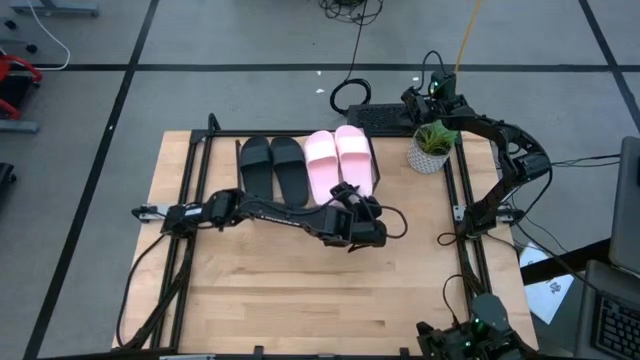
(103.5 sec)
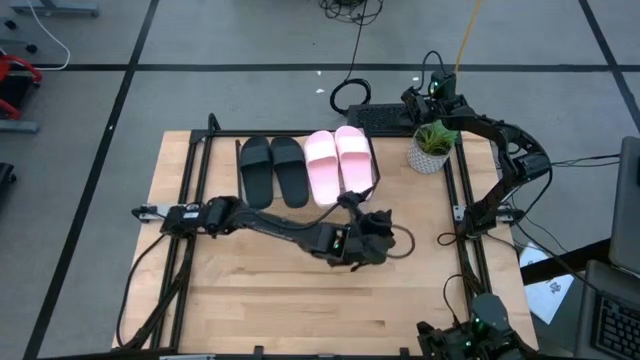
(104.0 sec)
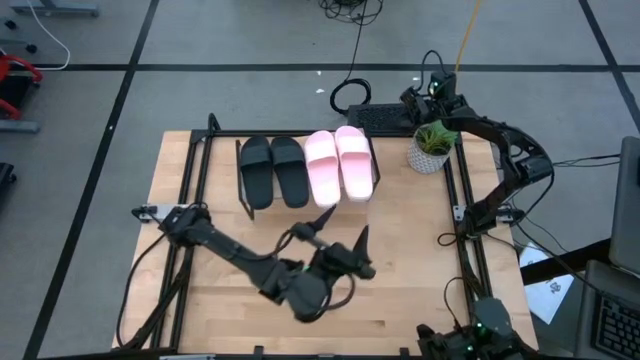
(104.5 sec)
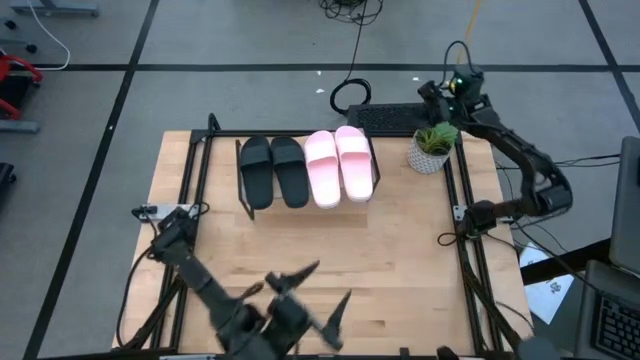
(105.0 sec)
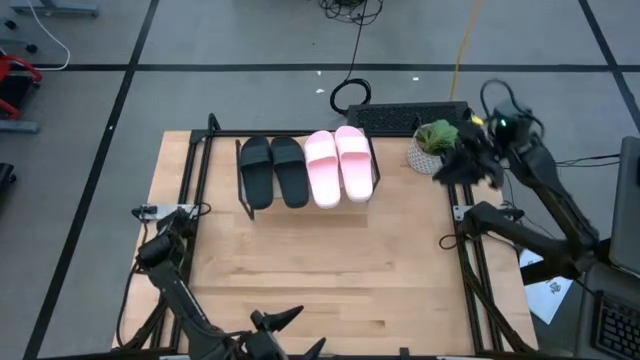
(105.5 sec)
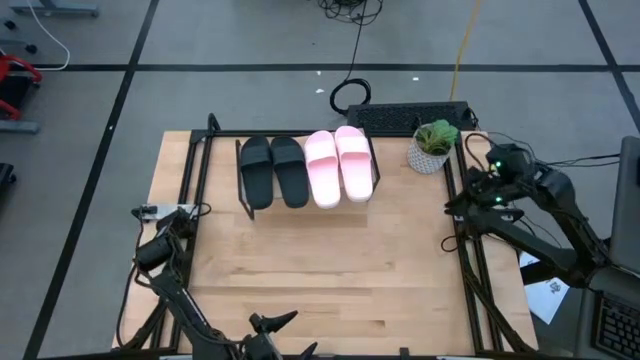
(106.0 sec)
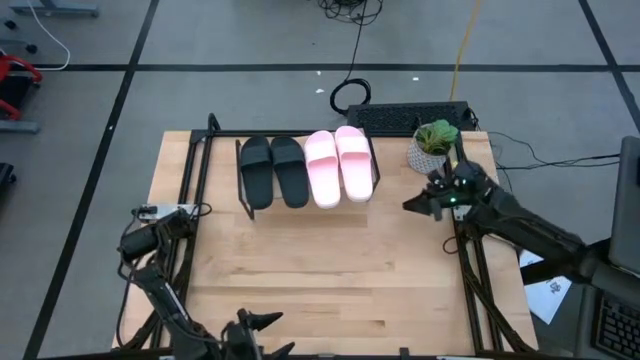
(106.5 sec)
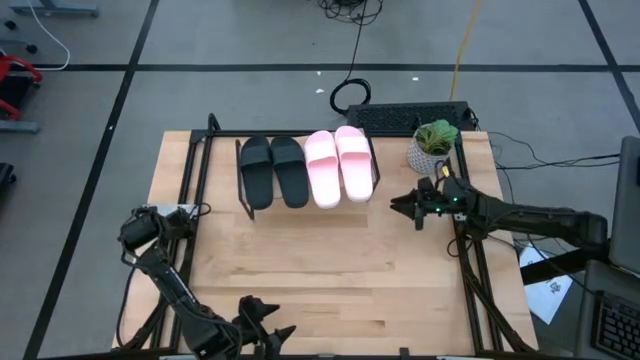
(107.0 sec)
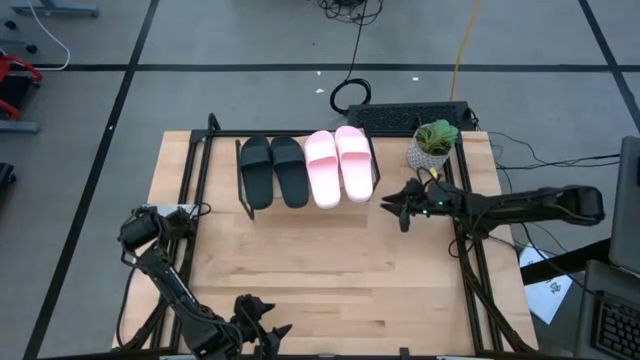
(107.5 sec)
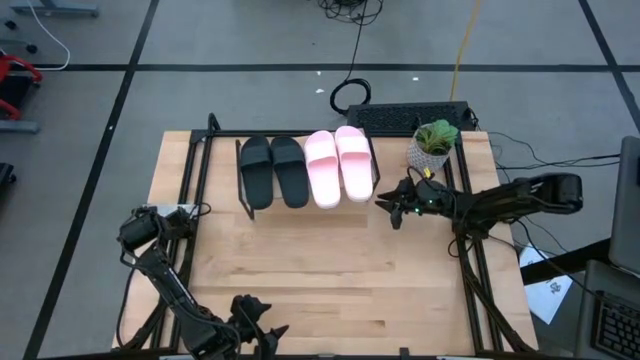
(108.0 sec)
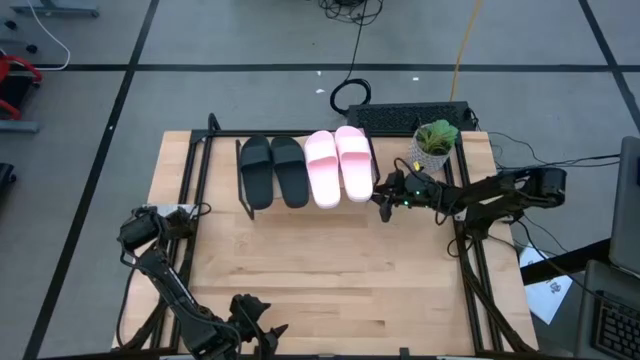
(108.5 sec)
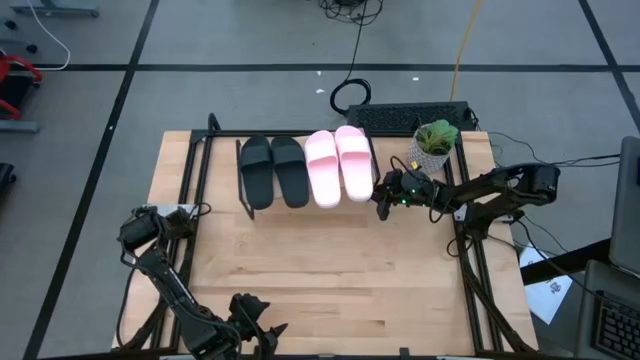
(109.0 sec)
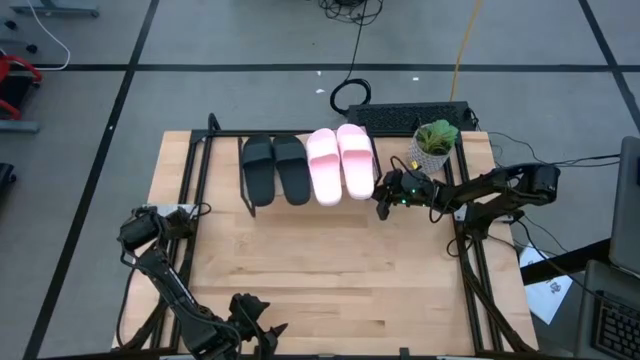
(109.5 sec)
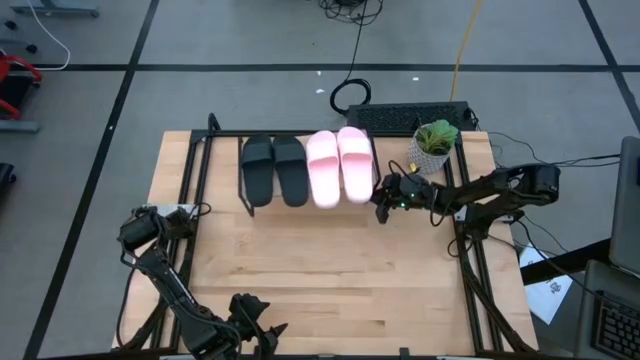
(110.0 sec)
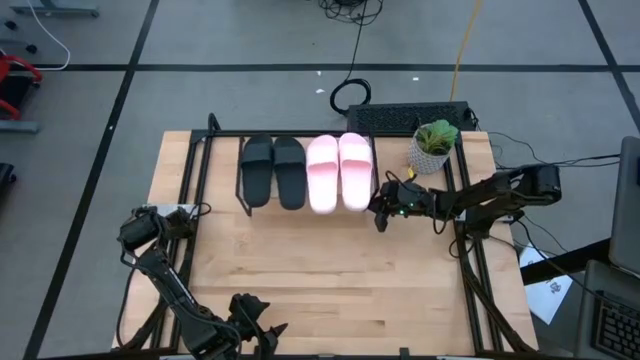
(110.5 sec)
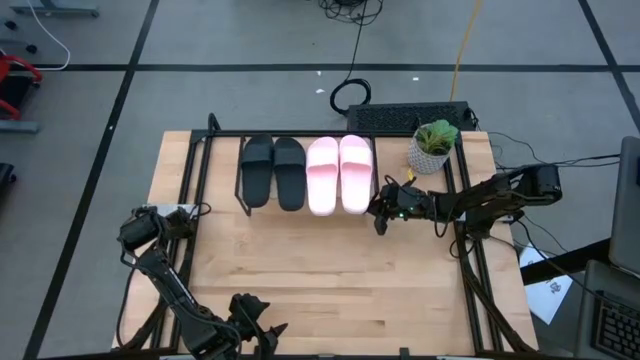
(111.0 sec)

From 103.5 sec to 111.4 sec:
Task: Pick and place slides into the shelf
Adjust the shelf

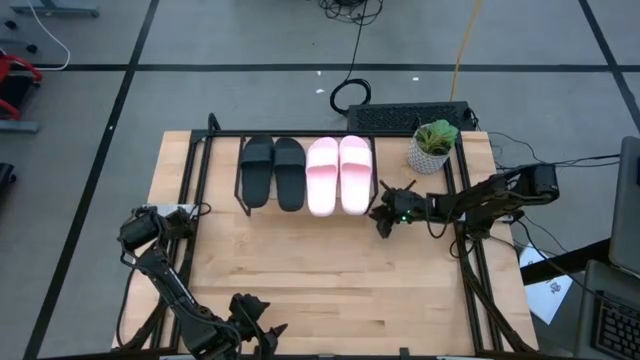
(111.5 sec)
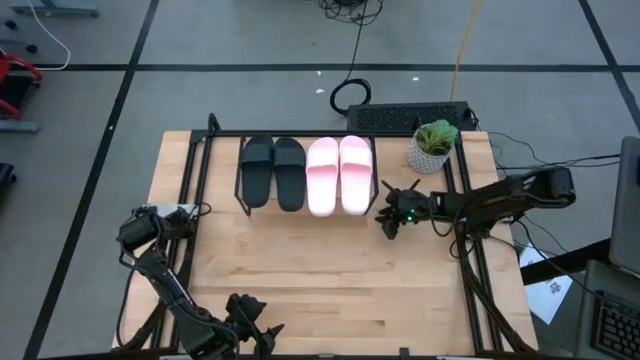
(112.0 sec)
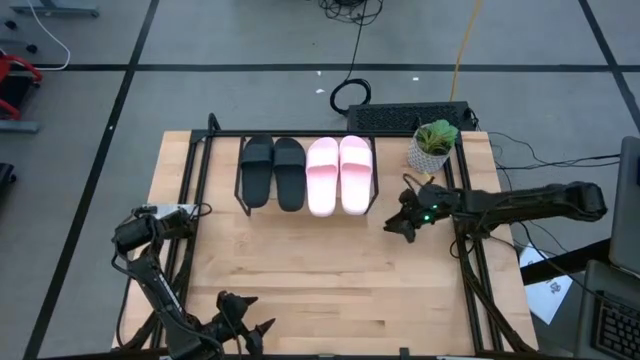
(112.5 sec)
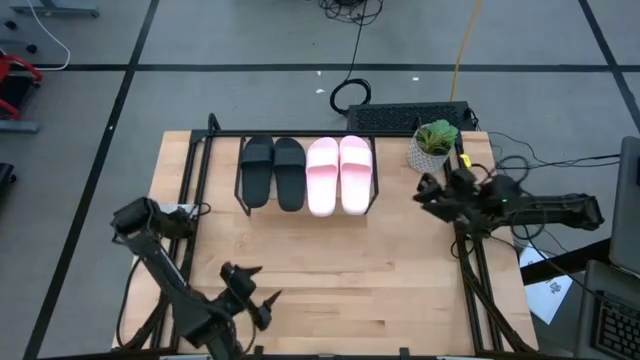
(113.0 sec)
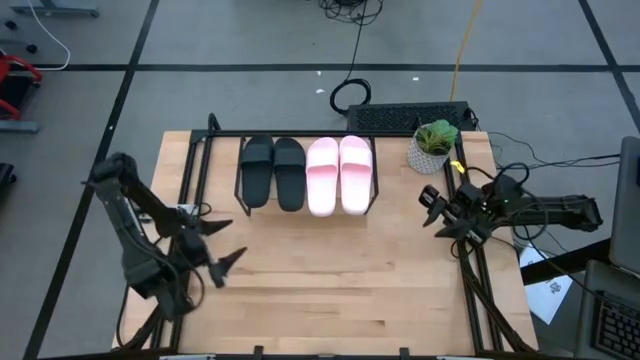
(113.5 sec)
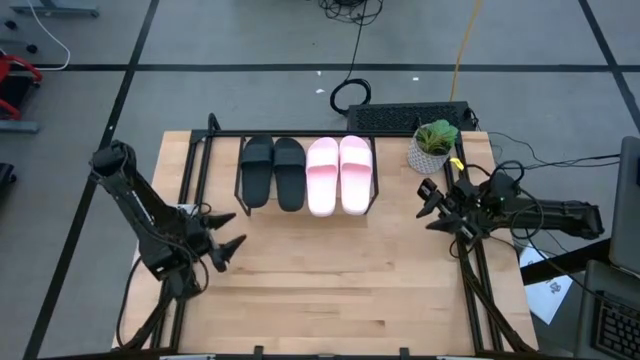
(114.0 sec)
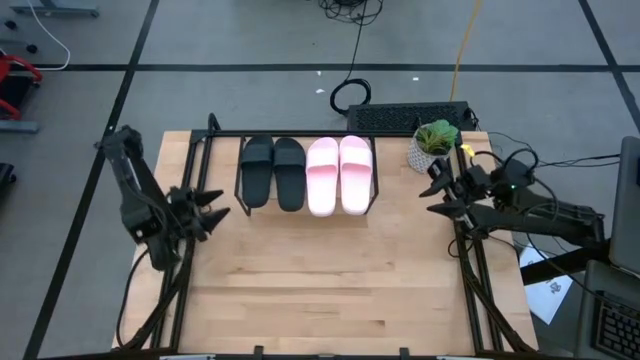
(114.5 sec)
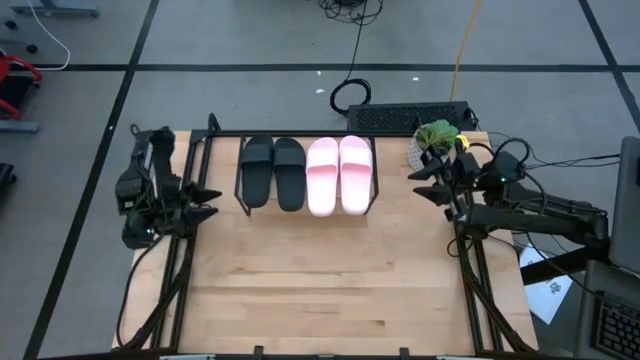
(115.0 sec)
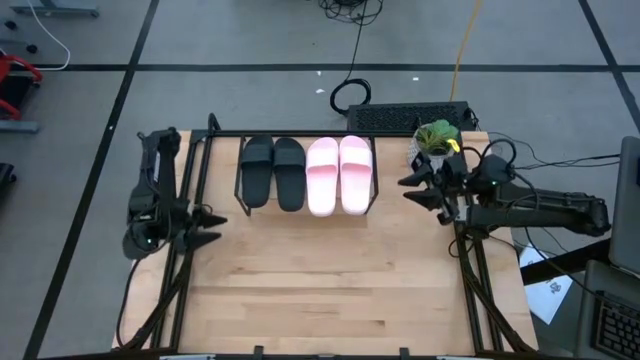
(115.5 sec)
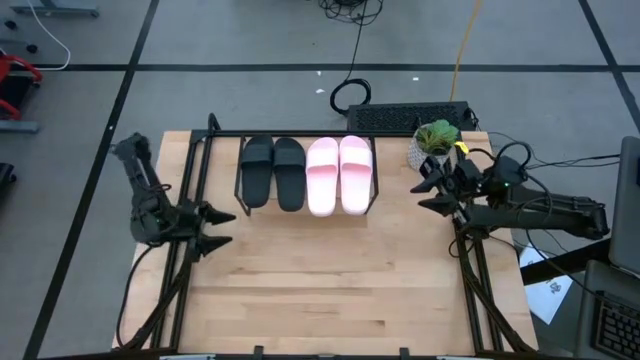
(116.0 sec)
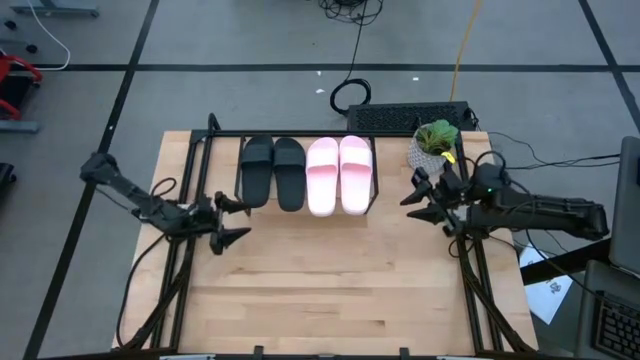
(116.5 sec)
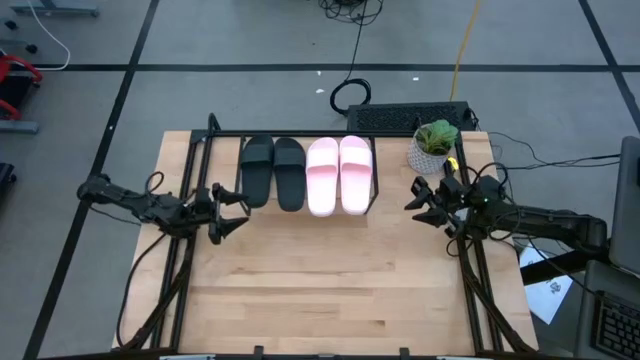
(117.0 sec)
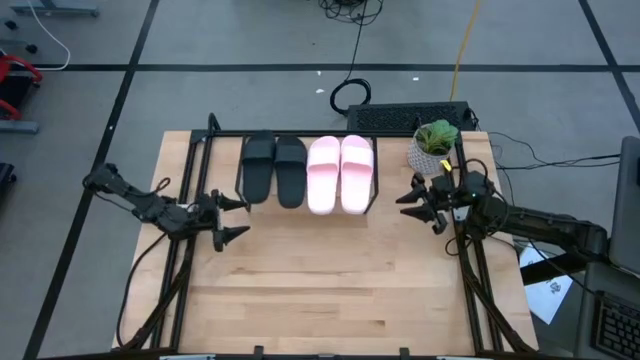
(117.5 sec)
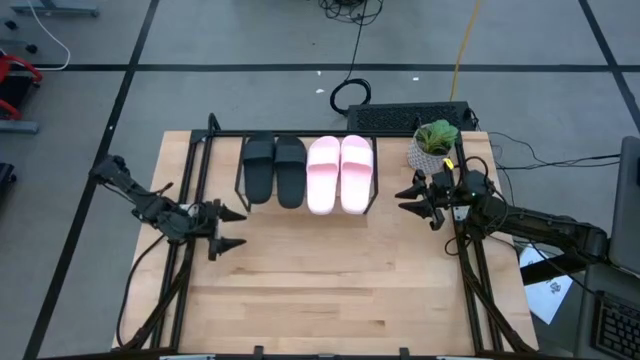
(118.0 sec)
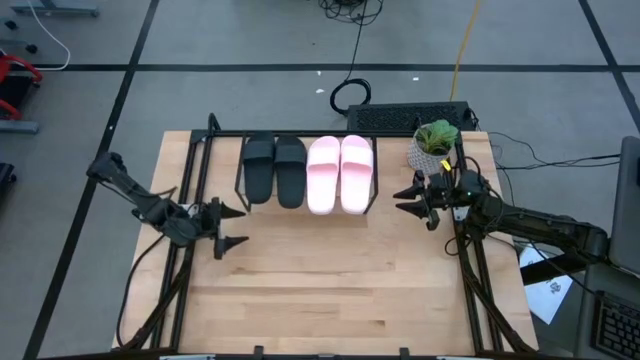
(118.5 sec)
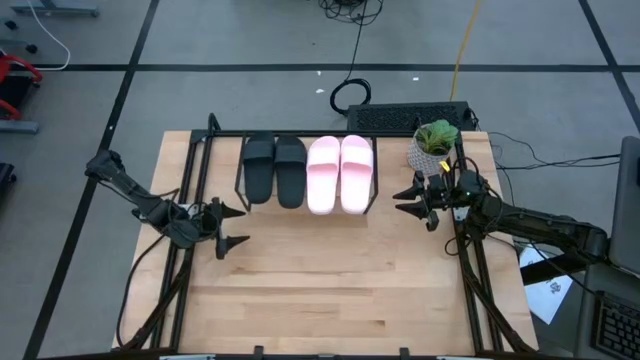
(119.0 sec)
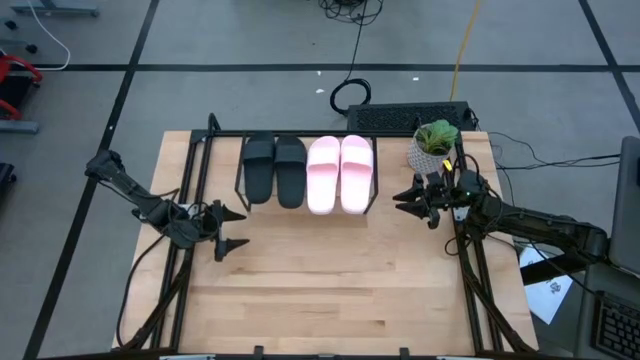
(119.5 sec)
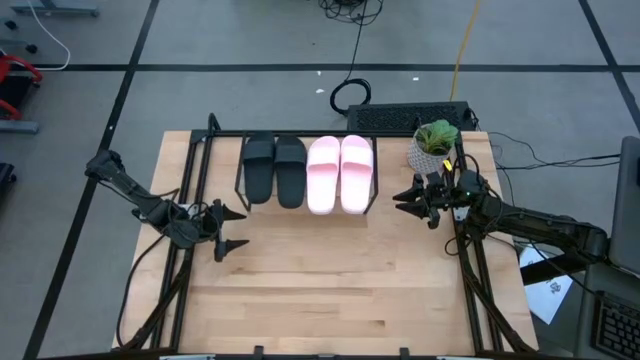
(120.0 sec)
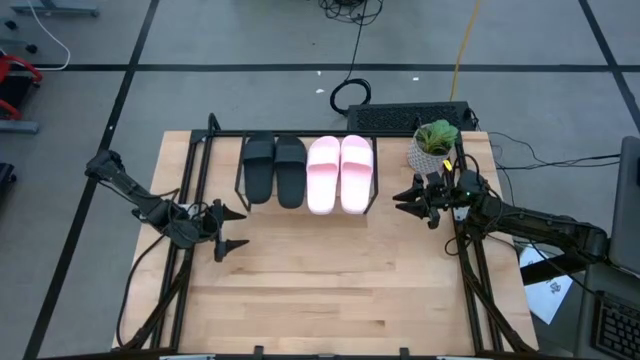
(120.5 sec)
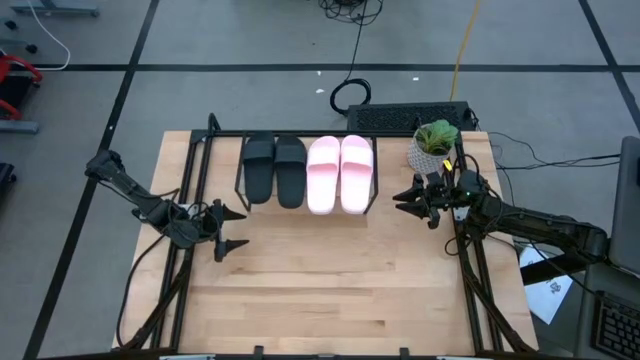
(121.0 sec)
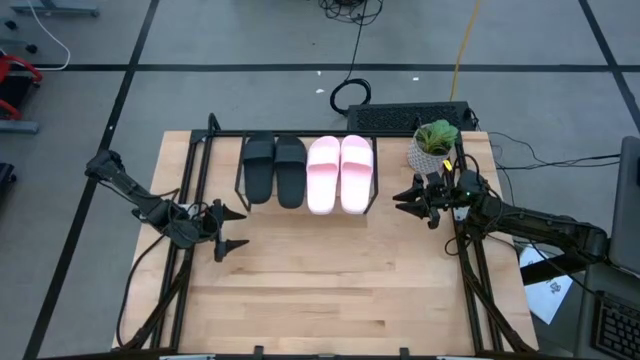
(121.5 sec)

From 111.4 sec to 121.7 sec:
Return to Home Position

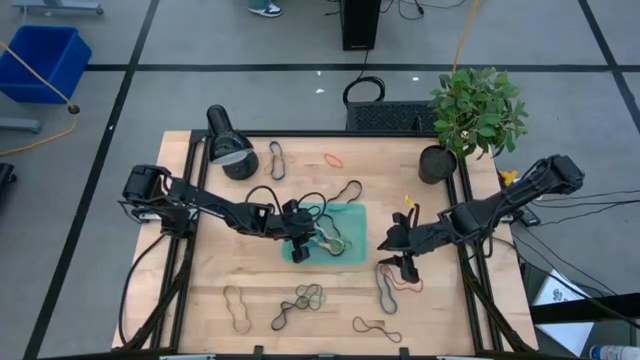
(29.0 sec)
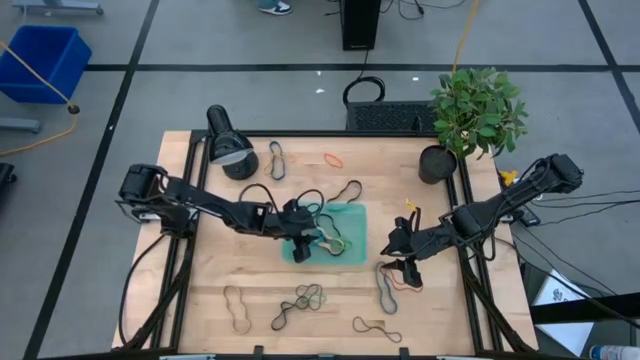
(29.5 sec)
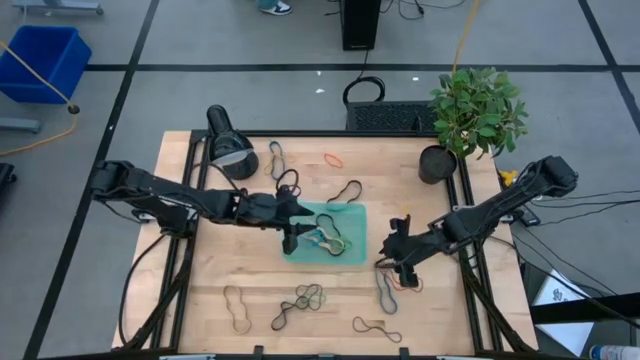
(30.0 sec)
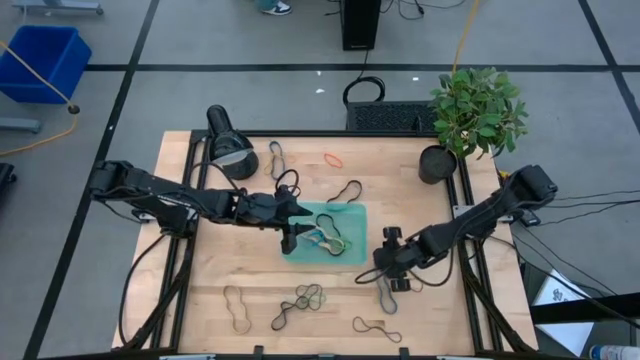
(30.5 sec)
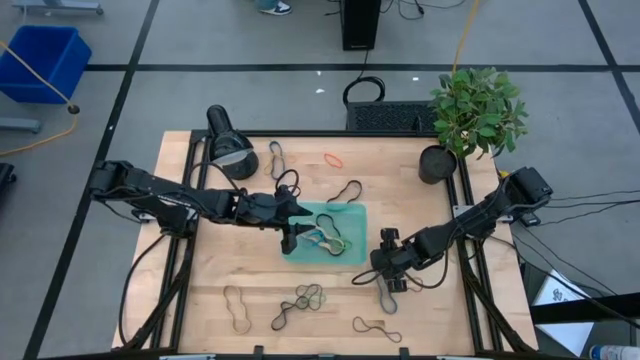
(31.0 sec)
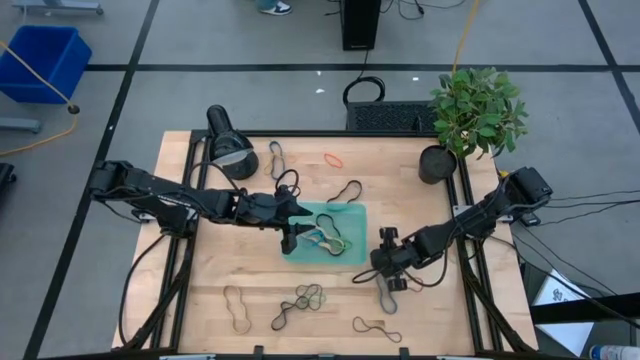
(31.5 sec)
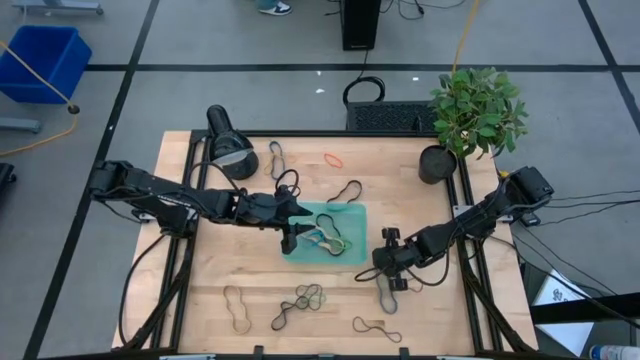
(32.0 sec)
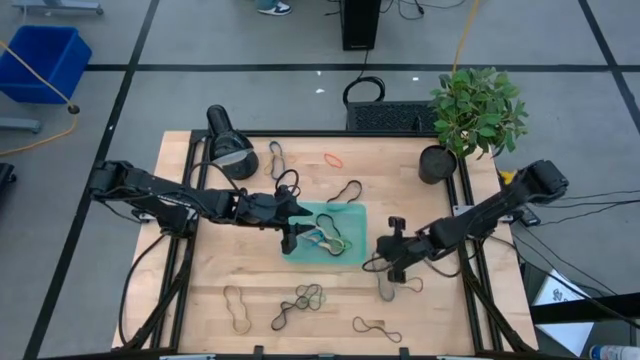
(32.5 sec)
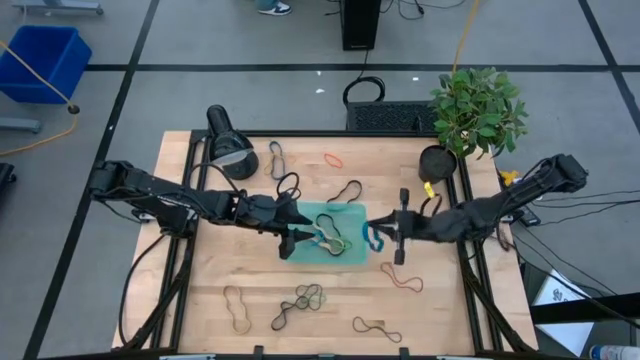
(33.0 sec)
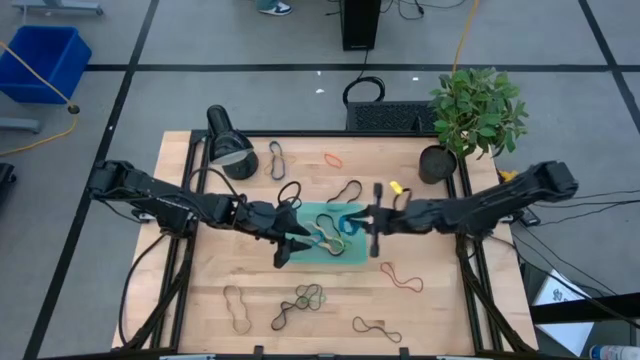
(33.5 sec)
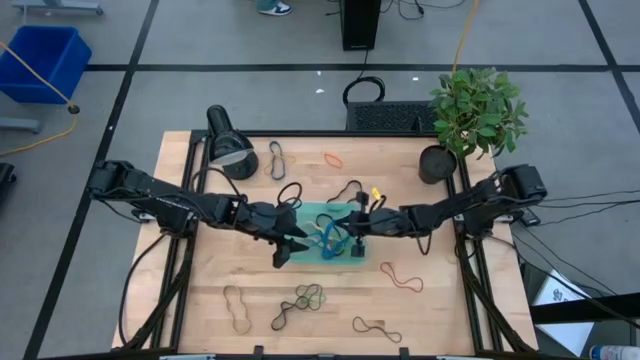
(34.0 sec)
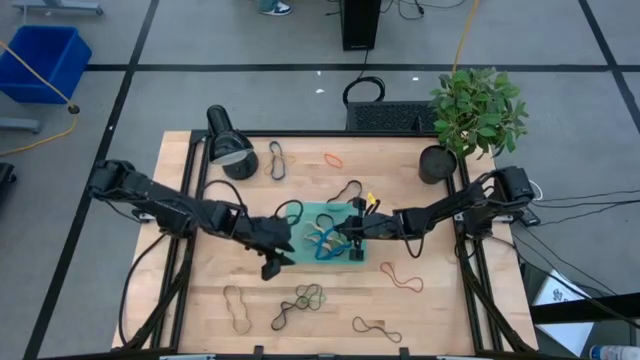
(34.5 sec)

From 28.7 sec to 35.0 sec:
Task: Pick and place rubber bands into bin
Put the blue rubber band into the green bin
